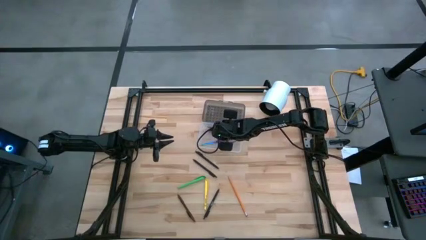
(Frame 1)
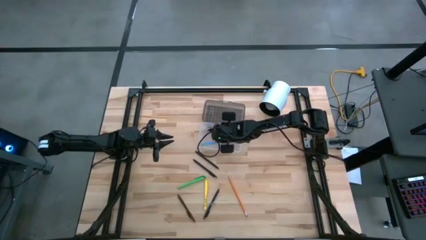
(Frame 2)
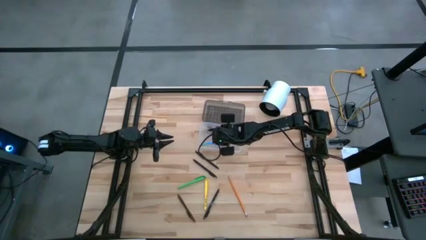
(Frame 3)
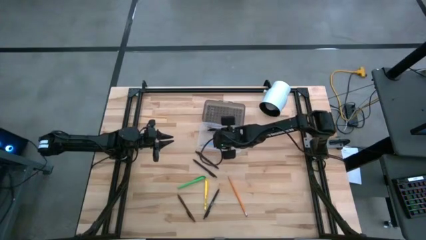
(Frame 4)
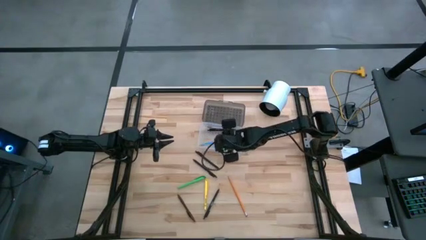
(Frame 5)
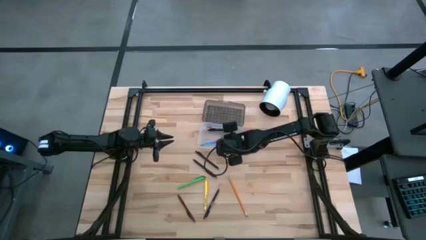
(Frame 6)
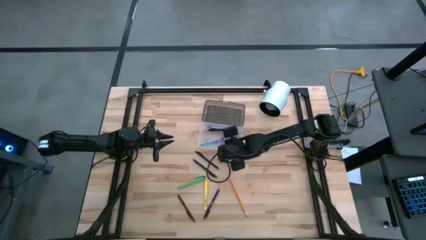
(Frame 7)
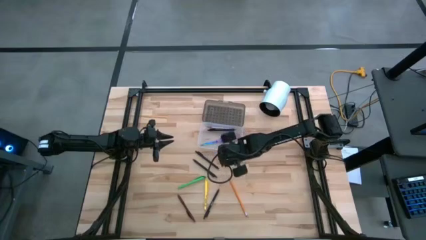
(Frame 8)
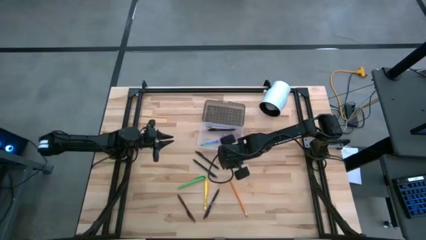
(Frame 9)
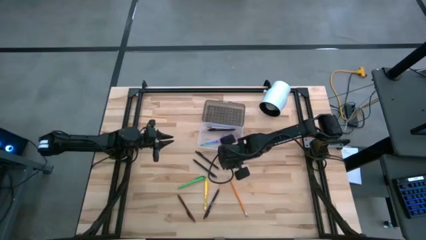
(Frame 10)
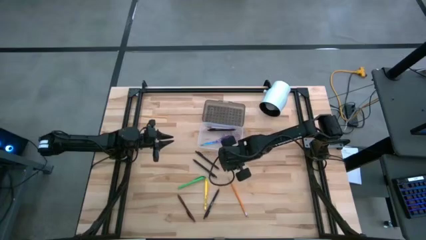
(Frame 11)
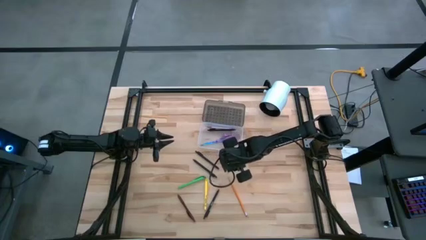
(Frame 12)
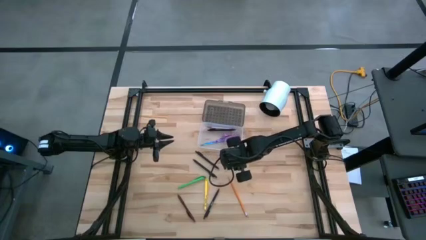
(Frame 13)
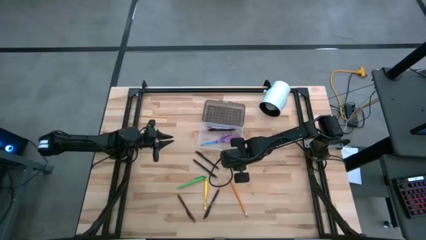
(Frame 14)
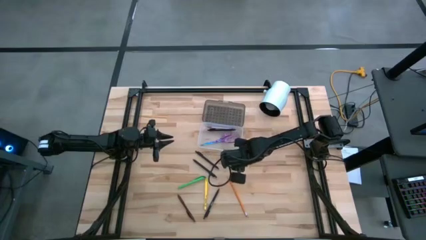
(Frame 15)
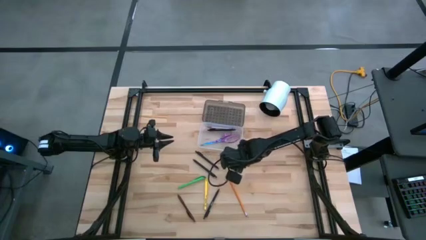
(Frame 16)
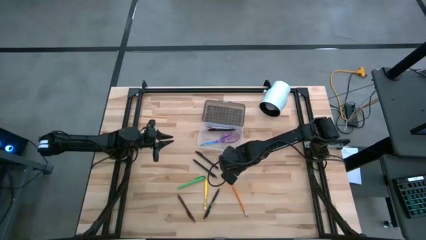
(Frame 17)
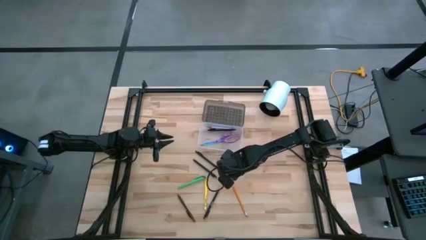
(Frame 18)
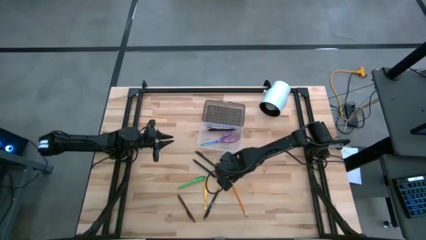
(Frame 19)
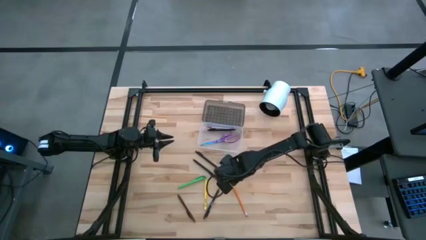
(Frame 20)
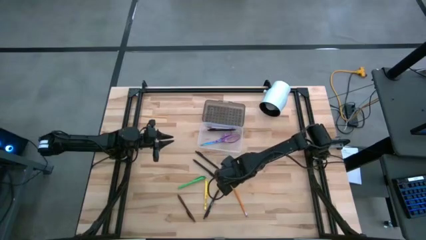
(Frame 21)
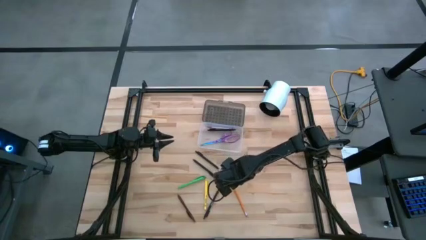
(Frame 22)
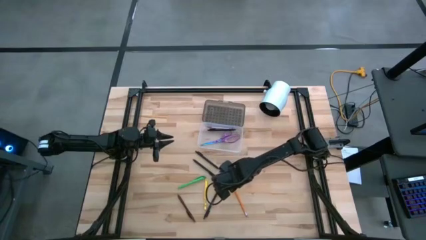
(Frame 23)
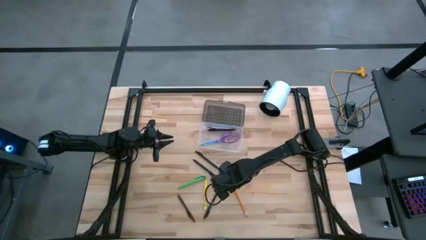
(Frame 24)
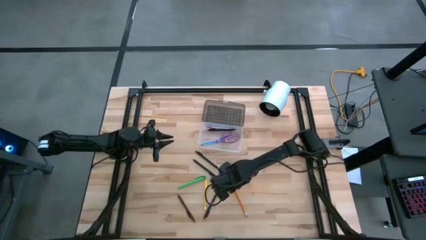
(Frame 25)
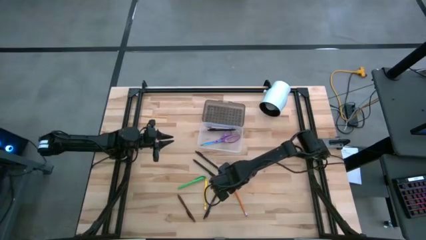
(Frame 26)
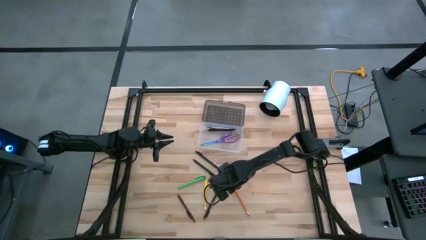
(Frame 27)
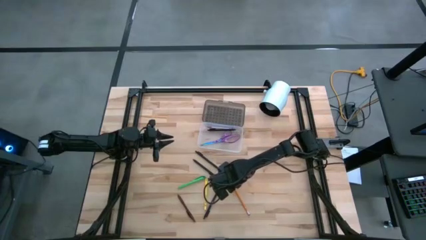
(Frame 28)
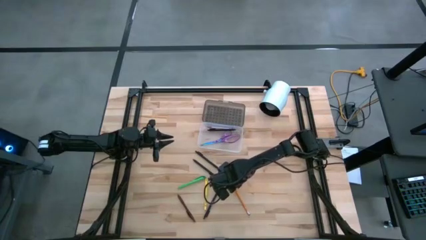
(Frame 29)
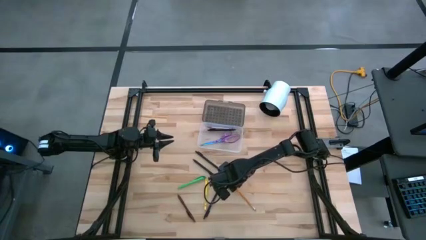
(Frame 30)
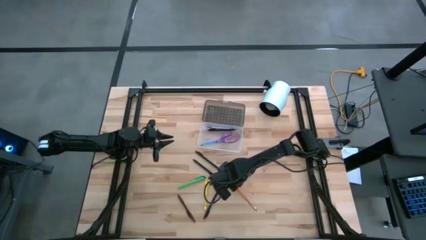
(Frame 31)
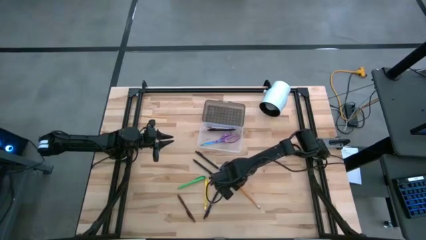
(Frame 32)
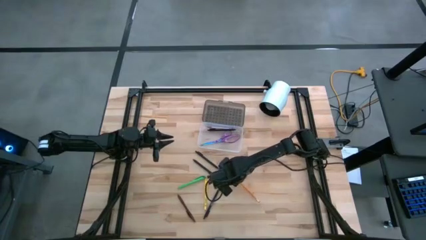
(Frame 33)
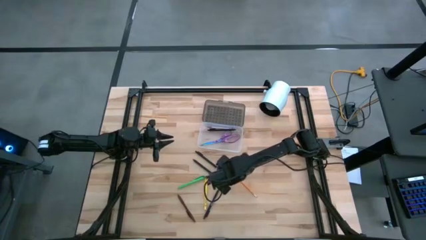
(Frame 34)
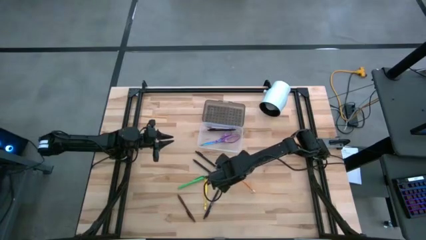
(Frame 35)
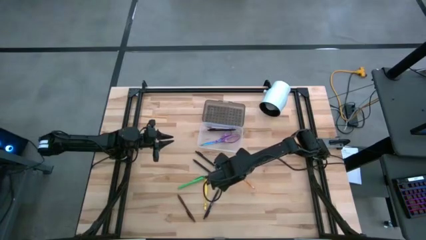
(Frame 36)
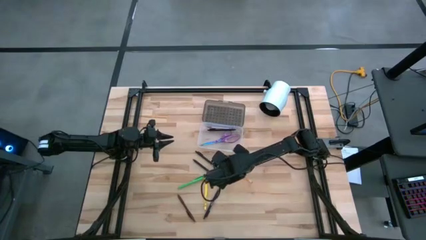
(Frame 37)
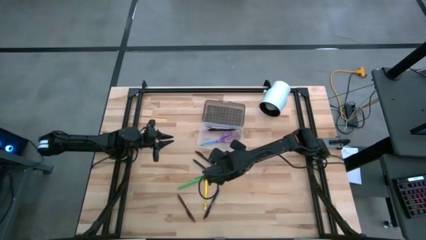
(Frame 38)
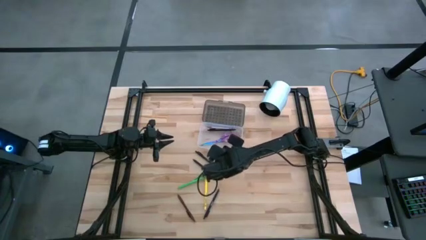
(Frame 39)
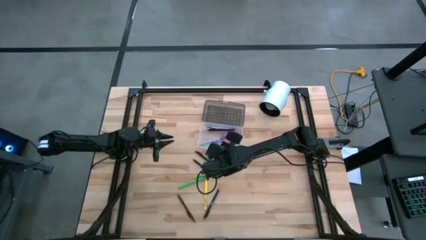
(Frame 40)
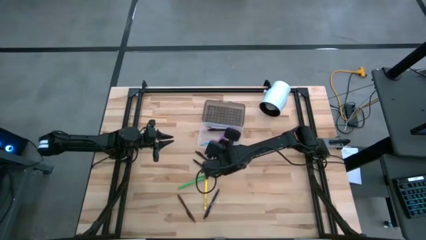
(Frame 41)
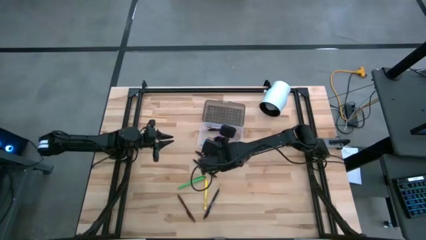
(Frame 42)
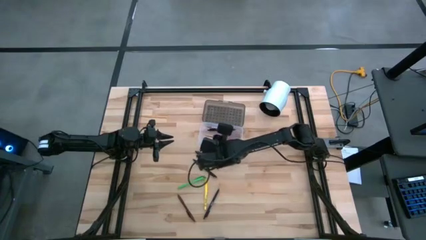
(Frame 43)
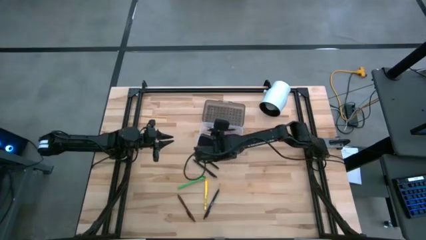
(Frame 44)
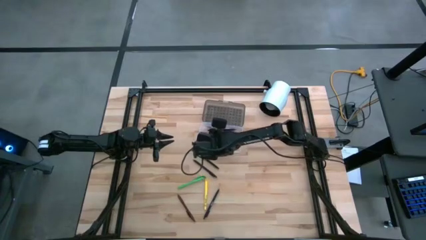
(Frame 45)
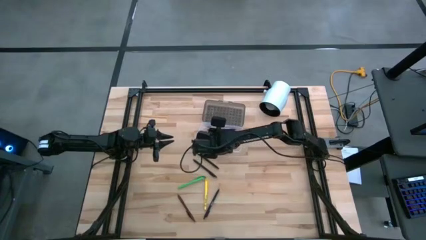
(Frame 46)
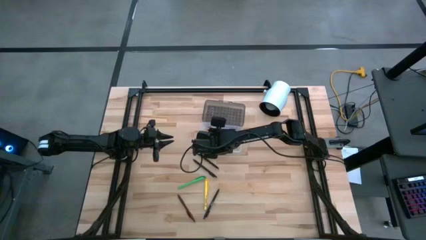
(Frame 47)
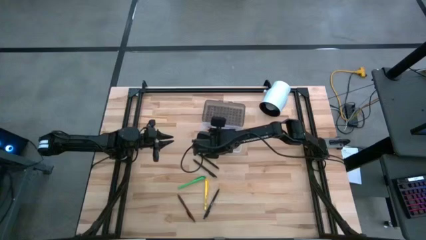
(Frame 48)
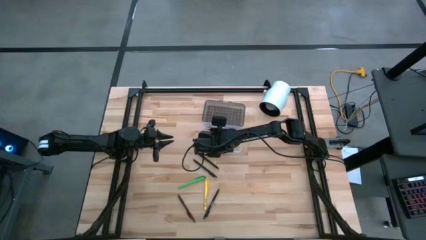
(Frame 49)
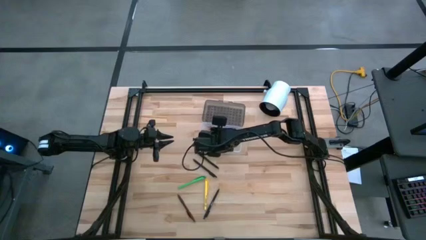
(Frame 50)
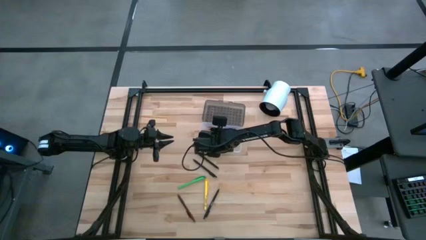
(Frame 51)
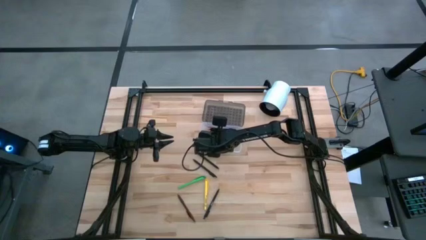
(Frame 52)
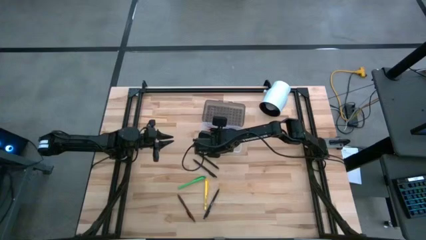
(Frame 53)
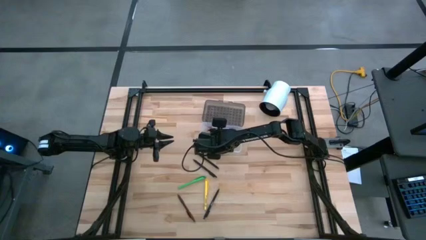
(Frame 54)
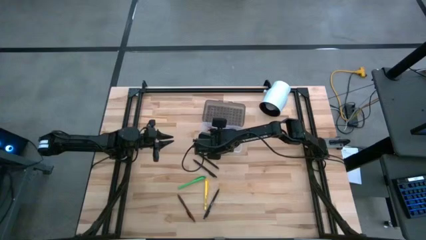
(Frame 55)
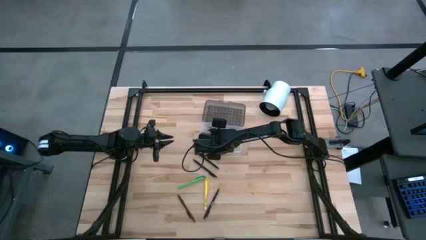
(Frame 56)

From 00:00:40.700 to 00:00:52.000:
Task: Pick & place school supplies into a supply box
Put the orange pencil into the supply box
